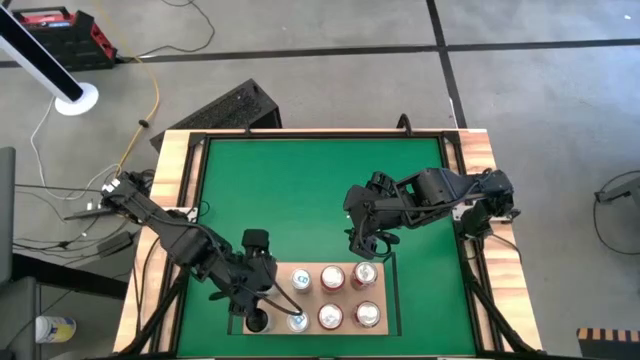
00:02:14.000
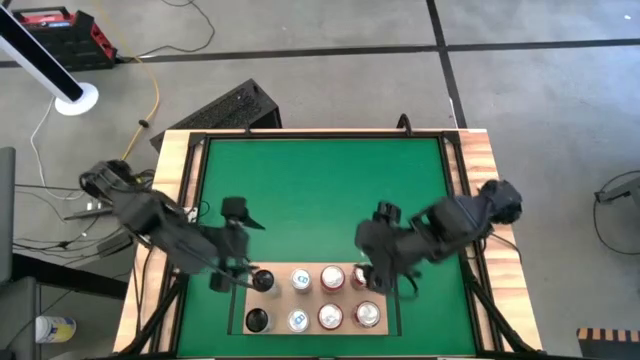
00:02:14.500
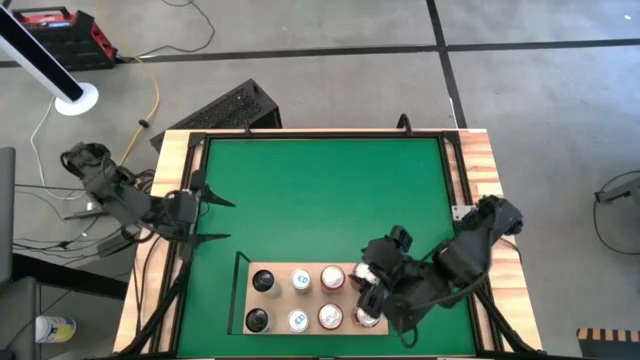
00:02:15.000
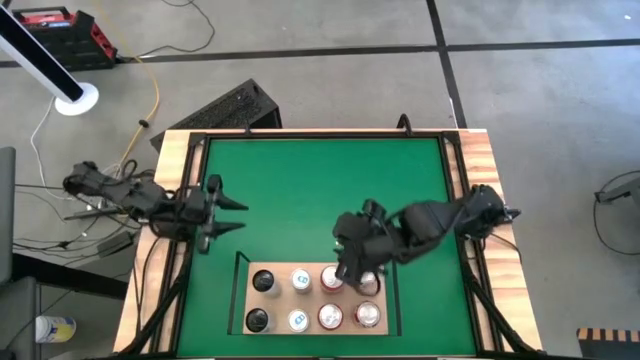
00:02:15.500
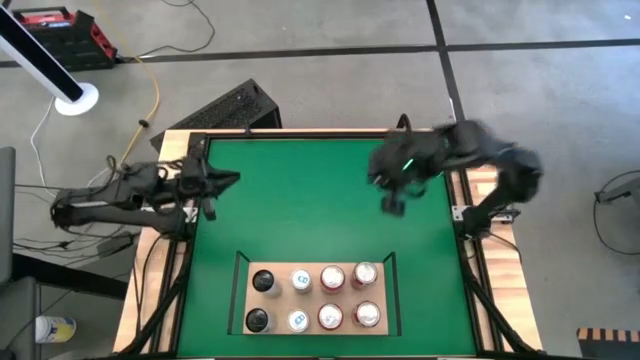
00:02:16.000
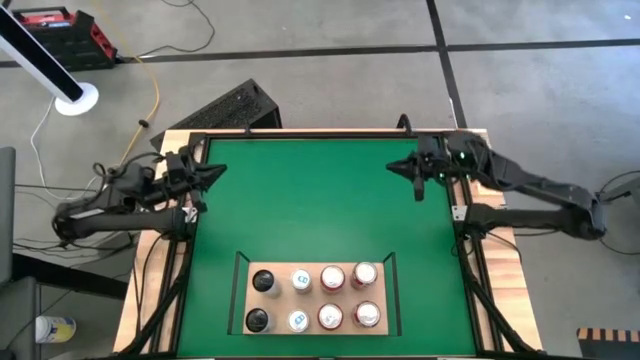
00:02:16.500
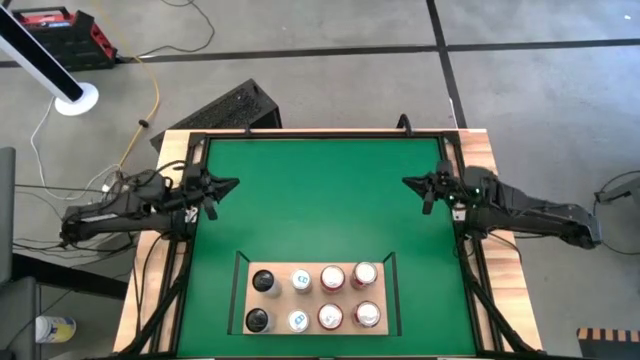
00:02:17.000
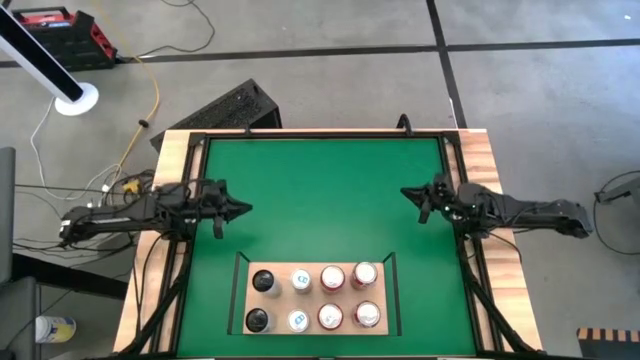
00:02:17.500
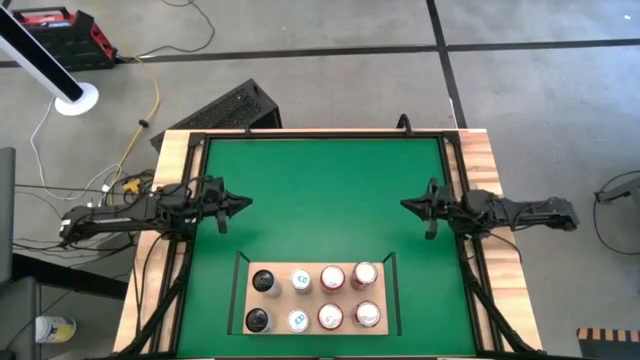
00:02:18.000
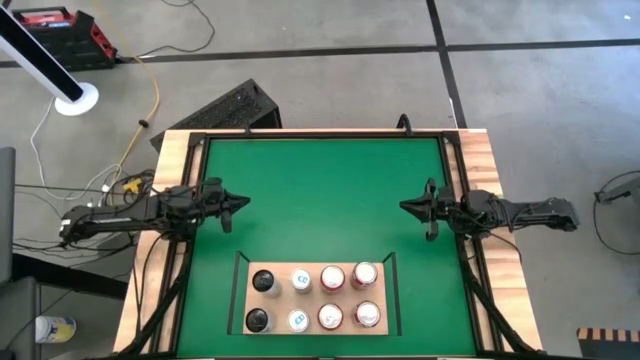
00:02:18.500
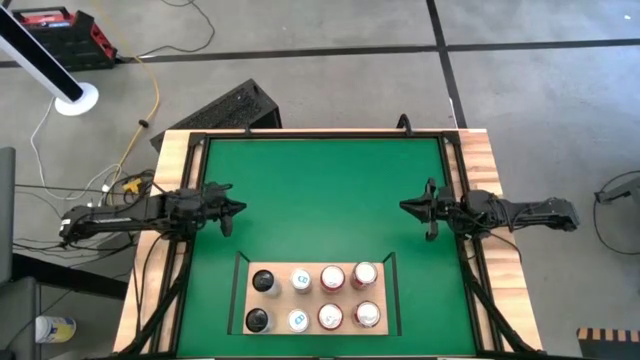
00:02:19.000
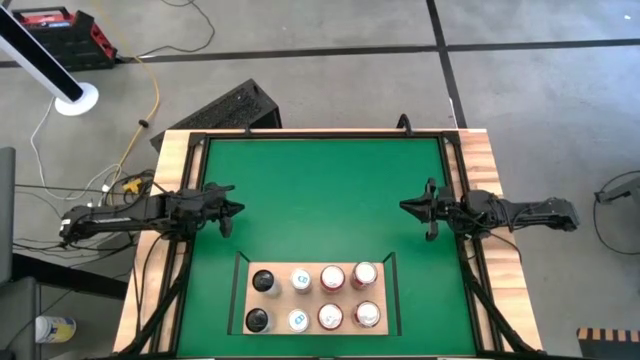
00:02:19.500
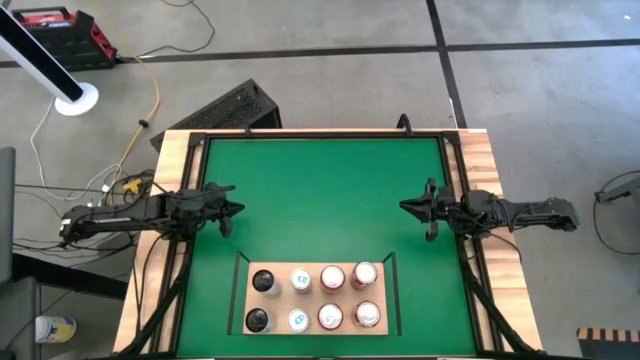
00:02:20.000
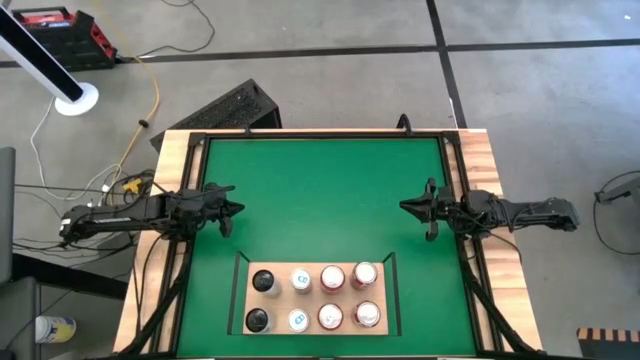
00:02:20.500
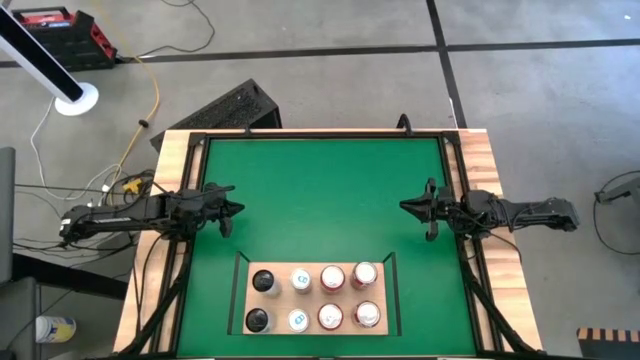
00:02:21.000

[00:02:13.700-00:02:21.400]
Task: Place canned beverage on shelf
Return to Home Position
